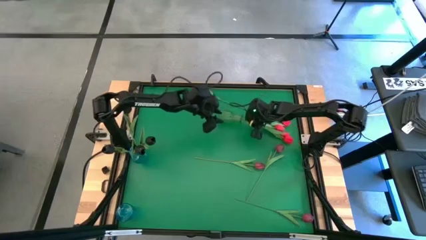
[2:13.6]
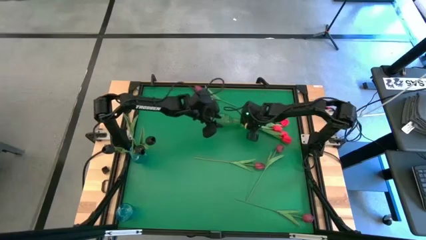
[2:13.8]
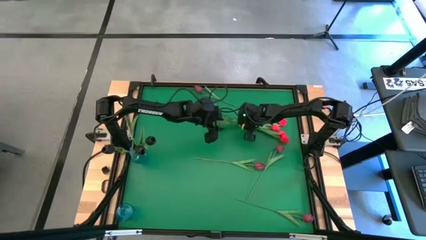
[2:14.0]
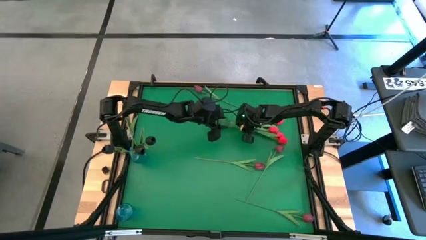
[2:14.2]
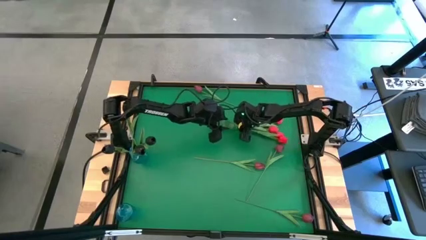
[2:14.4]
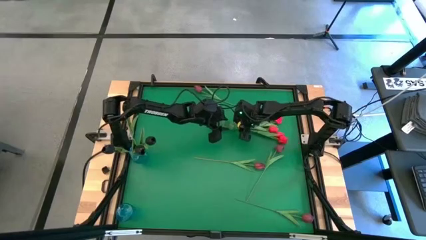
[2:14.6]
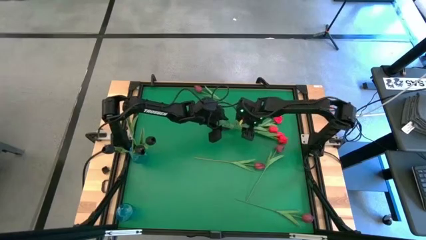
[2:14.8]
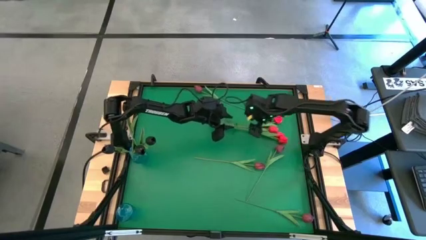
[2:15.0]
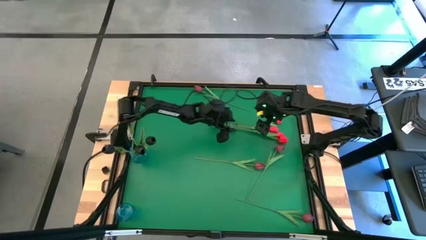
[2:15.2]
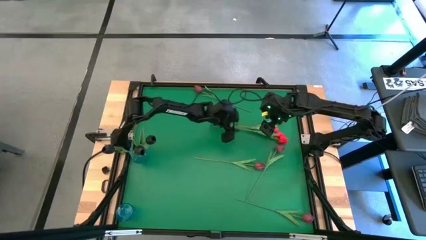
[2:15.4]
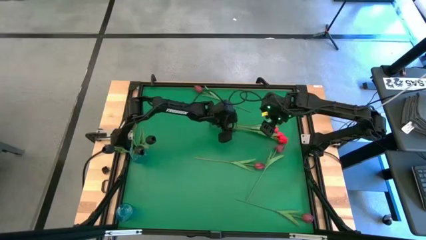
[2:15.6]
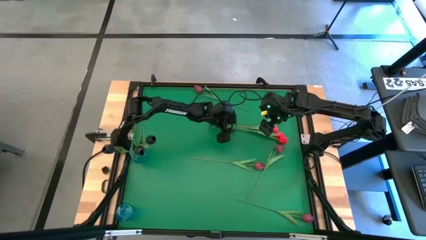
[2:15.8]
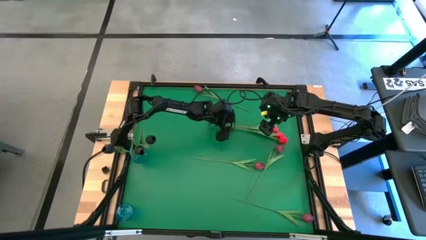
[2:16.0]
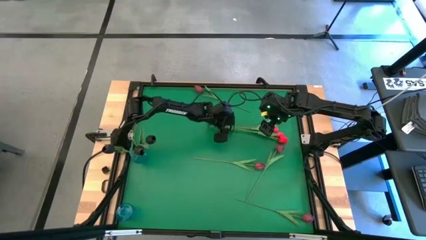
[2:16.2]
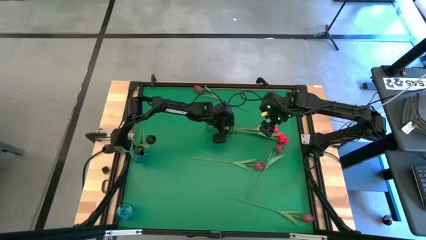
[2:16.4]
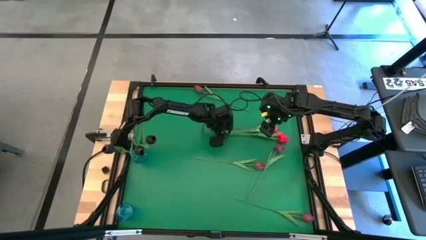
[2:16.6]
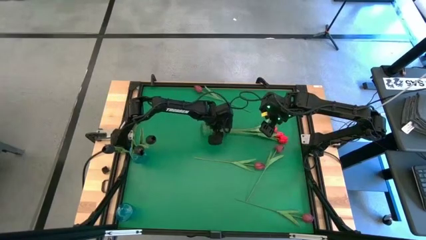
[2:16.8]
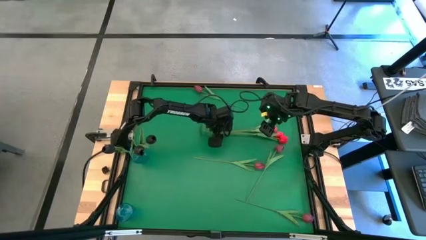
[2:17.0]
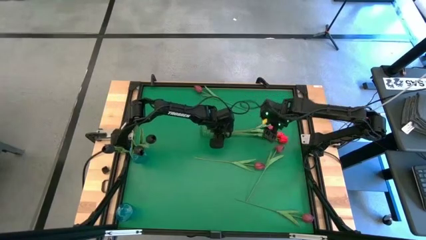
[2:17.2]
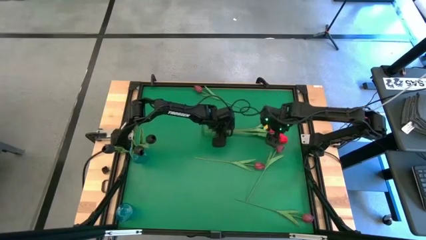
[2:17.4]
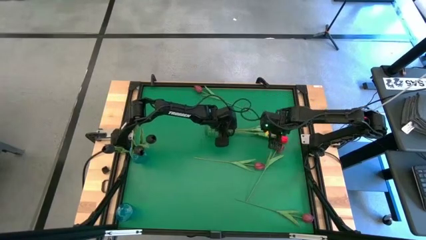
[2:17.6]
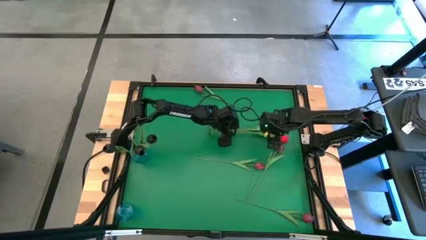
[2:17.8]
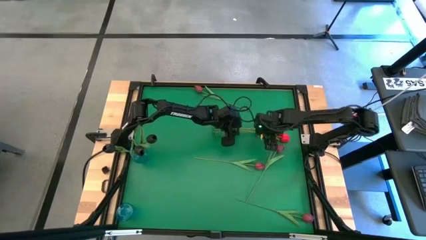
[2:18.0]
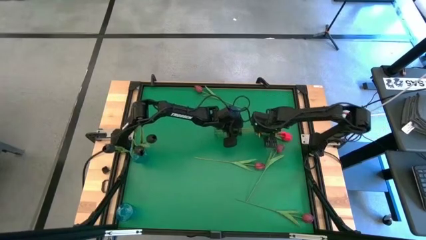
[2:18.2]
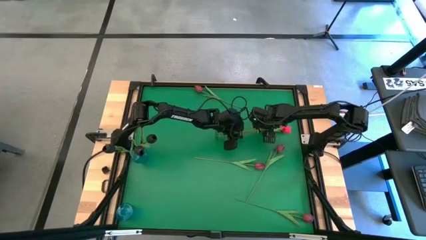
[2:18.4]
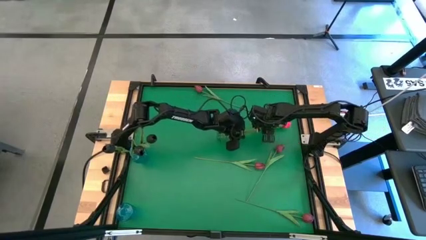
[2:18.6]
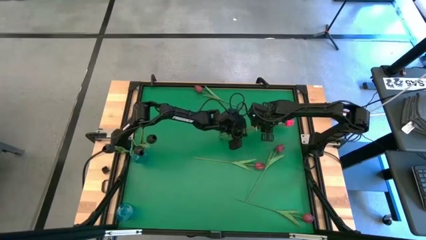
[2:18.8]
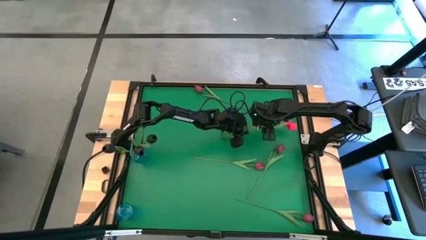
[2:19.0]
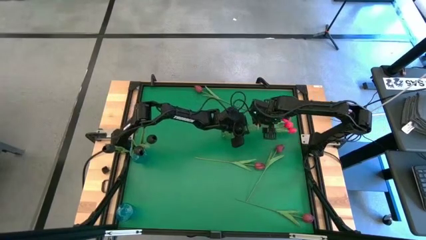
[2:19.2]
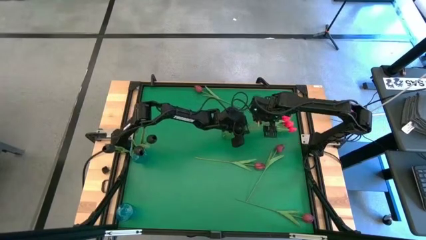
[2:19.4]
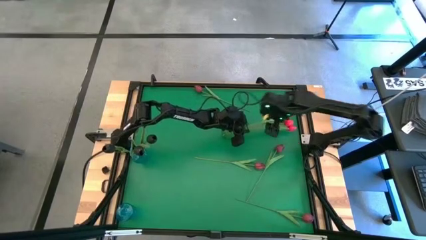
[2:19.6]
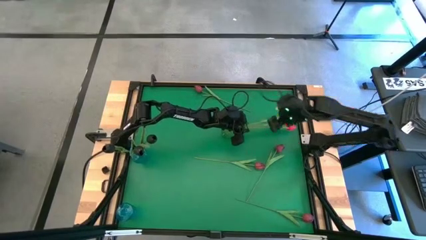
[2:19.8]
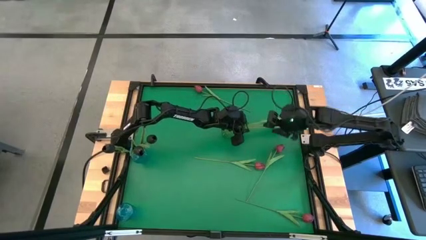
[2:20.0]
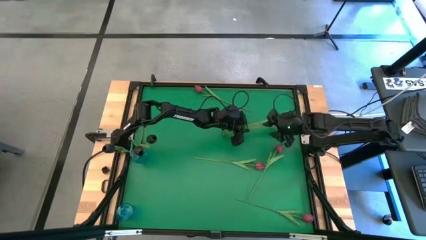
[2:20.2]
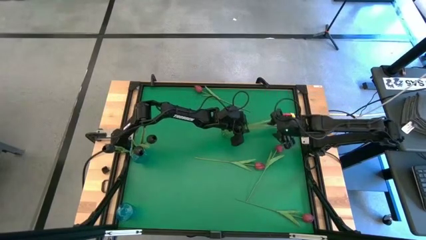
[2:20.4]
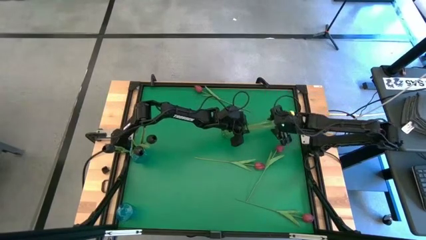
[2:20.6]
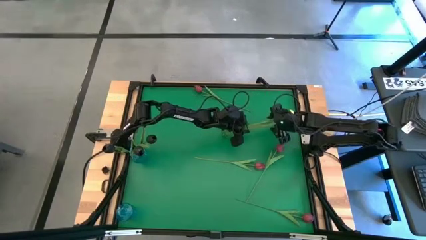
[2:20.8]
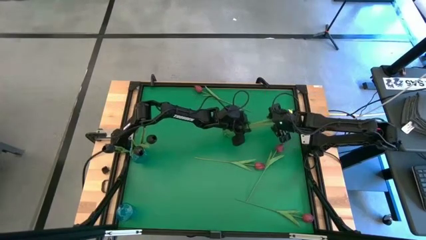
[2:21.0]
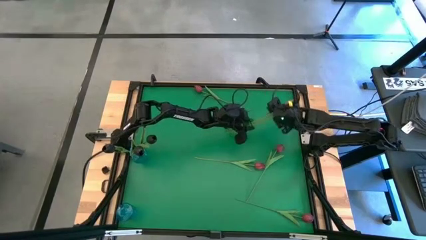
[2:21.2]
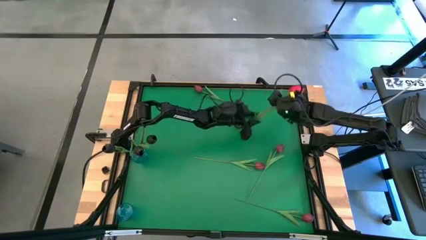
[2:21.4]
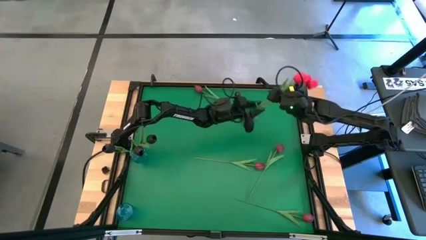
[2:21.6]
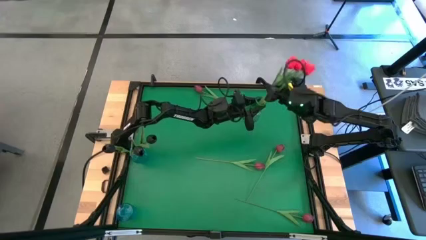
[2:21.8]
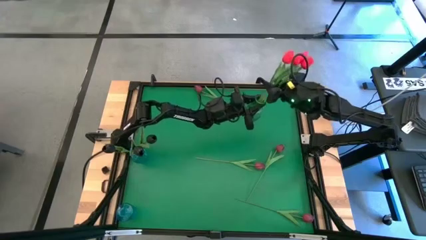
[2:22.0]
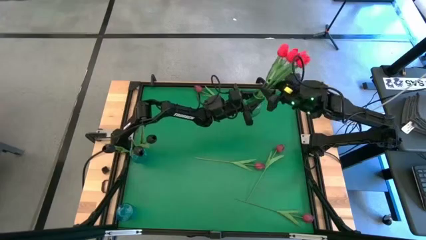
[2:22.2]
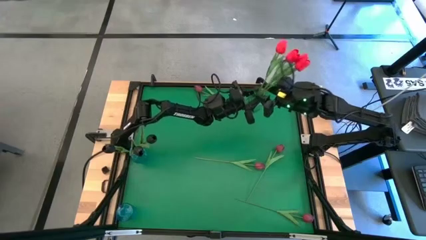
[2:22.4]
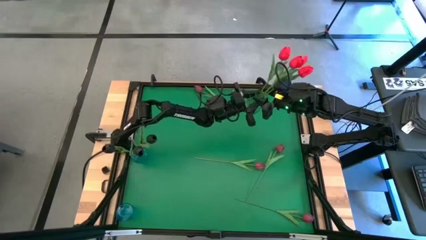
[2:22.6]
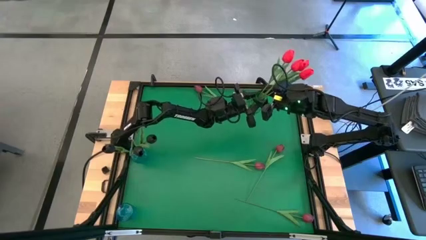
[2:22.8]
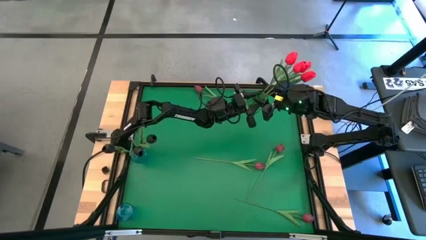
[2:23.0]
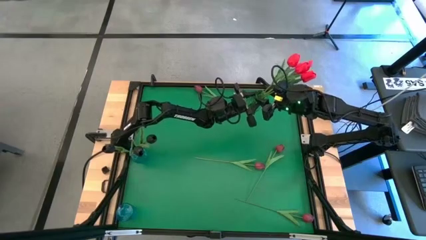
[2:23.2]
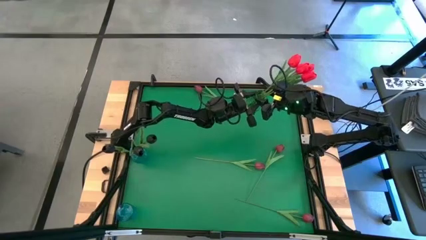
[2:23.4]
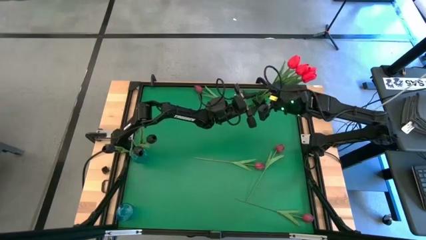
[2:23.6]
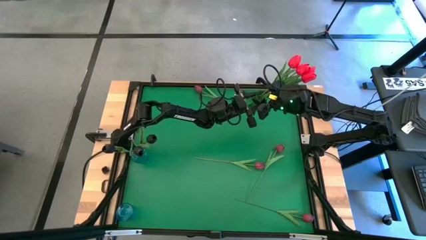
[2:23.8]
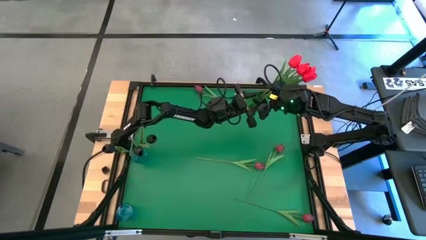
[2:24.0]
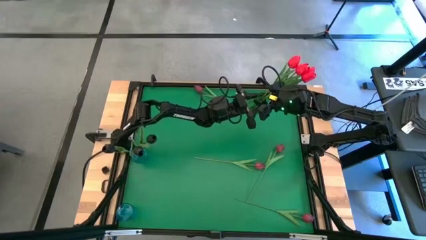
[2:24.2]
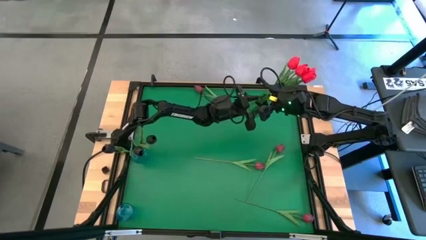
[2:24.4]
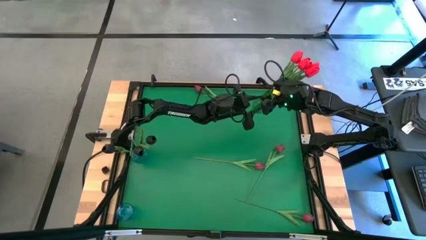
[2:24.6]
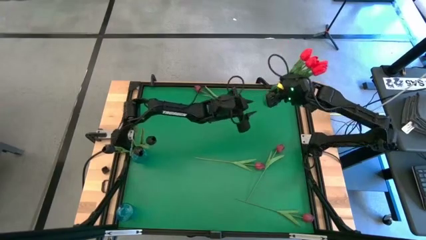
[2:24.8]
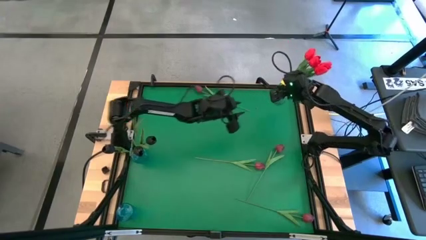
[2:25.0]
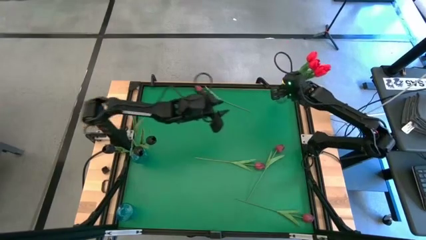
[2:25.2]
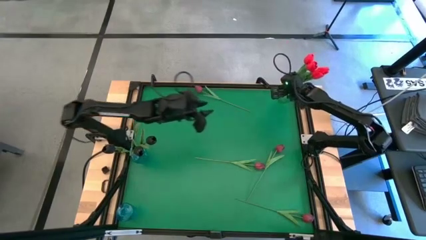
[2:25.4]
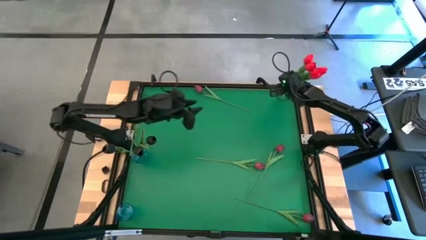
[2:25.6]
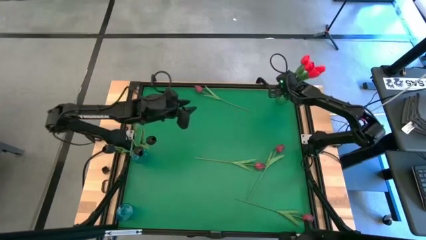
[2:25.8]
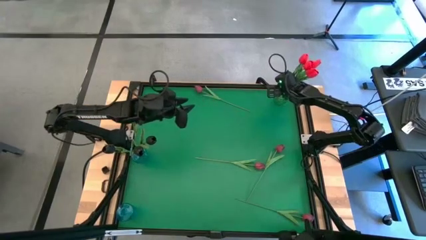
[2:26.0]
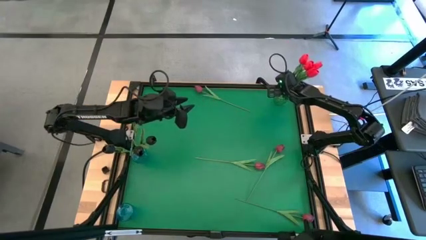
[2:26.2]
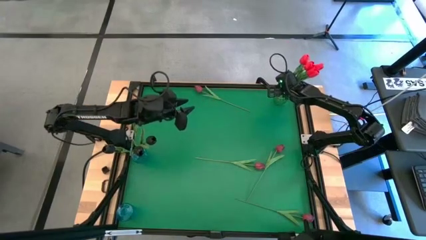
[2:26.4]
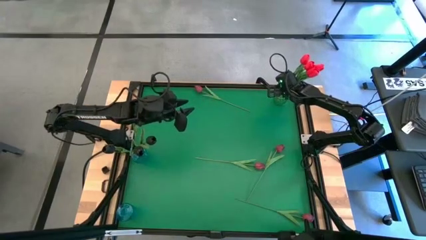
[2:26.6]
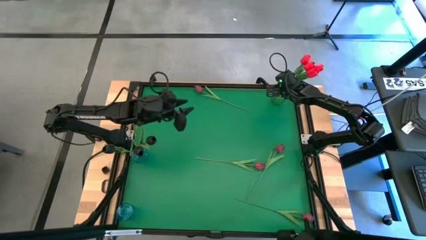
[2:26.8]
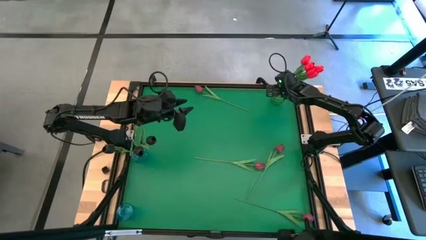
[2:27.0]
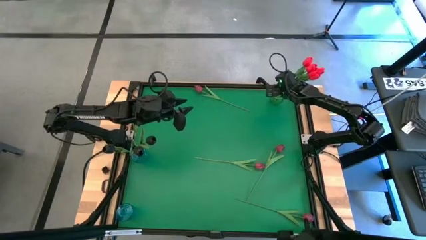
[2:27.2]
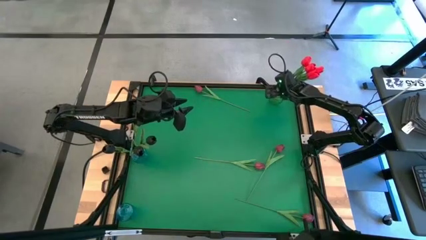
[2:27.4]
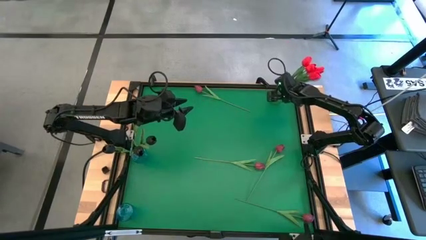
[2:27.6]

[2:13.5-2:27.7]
Task: Sort flowers into vase by color
Adjust the green vase on the top right of the table

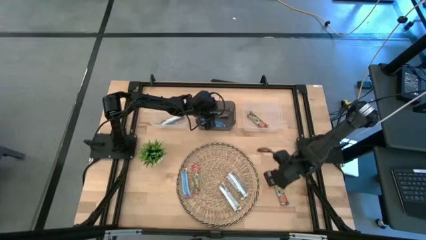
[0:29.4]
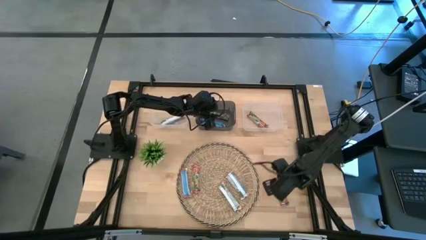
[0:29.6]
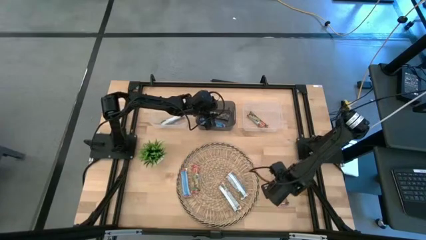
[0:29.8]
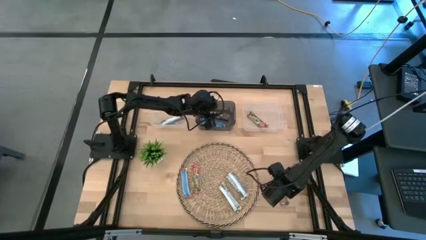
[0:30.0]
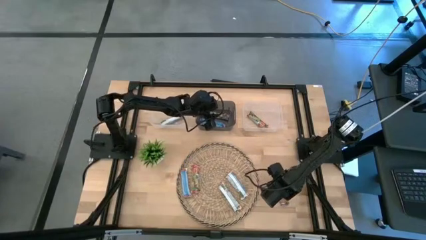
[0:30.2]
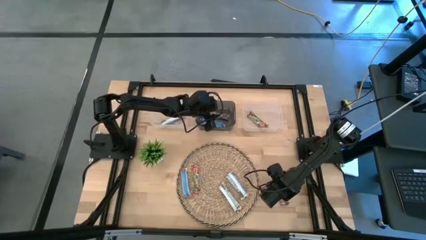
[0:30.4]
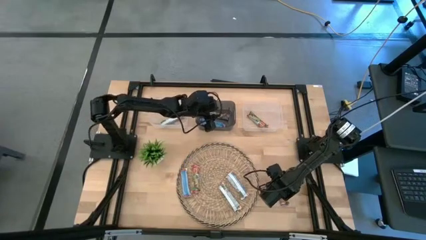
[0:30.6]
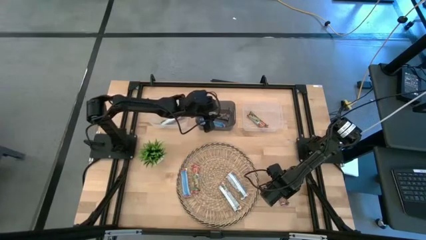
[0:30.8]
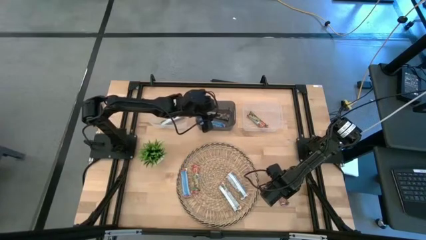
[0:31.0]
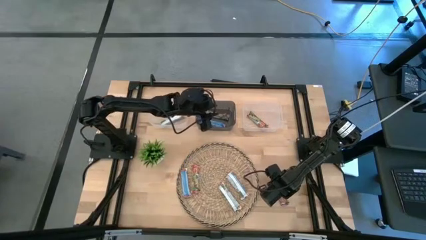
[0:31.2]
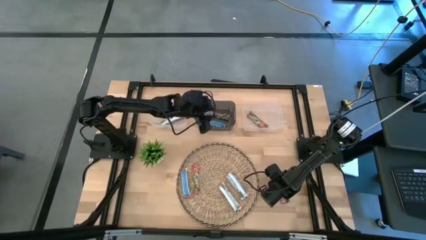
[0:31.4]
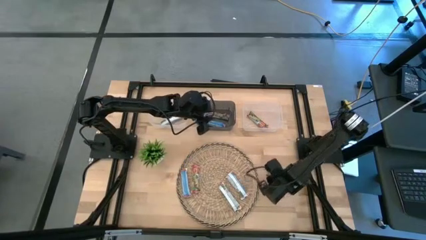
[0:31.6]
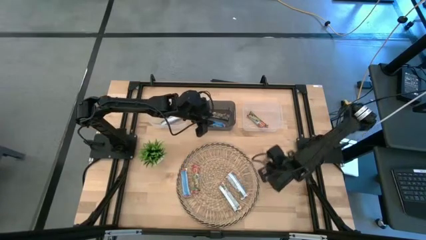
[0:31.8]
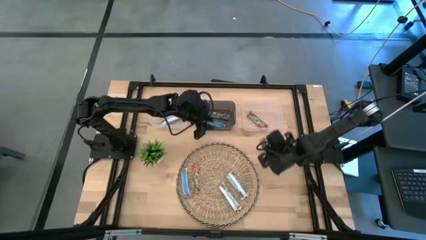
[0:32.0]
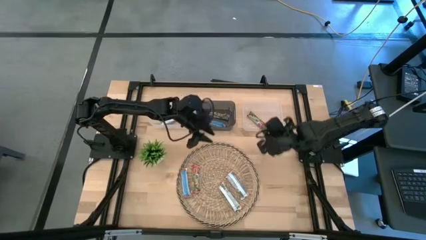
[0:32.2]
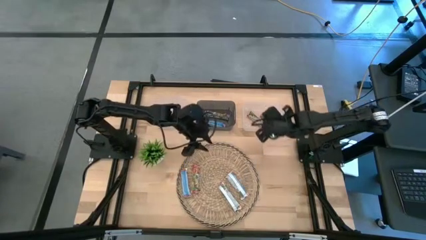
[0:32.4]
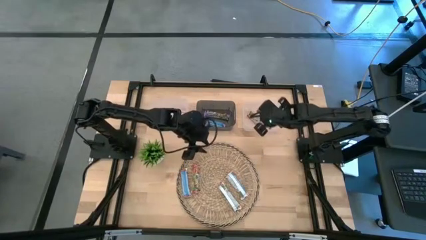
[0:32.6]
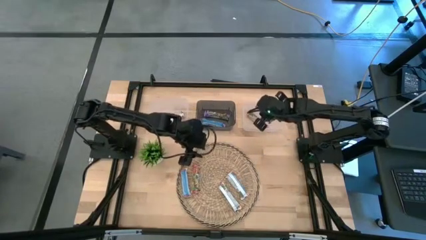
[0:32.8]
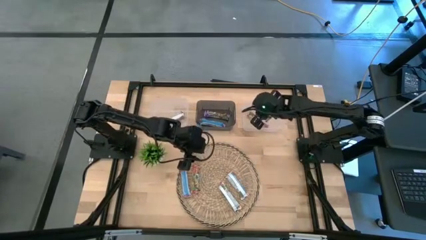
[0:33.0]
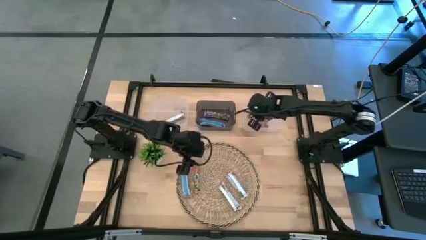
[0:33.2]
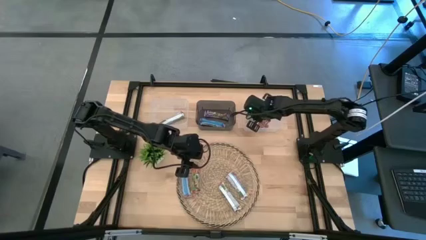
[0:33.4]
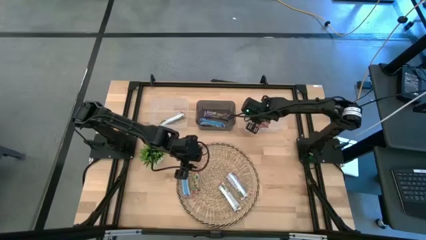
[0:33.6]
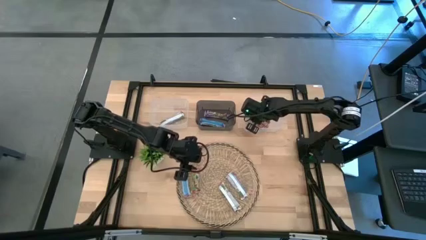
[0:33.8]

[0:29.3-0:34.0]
Task: Pick and place Granola Bars by type
Put the red granola bar into the right transparent bin
